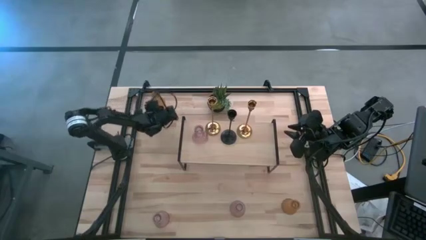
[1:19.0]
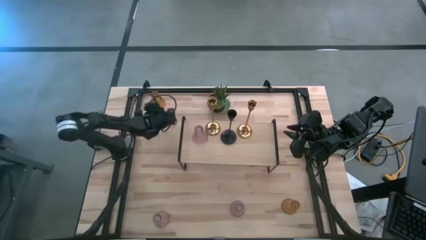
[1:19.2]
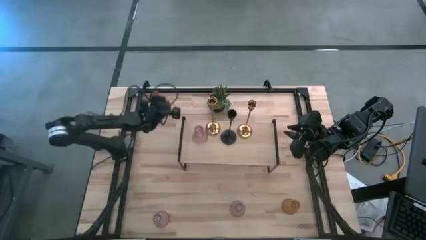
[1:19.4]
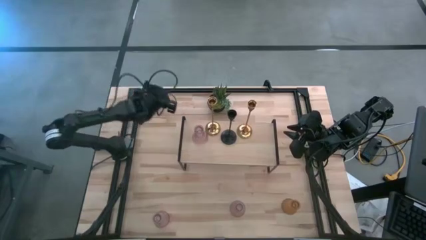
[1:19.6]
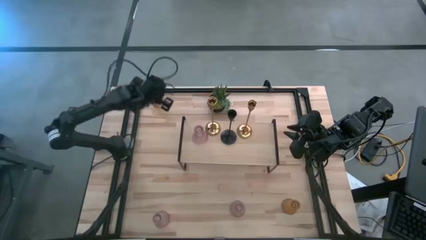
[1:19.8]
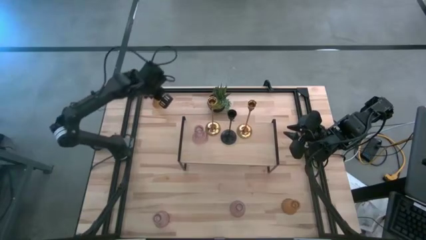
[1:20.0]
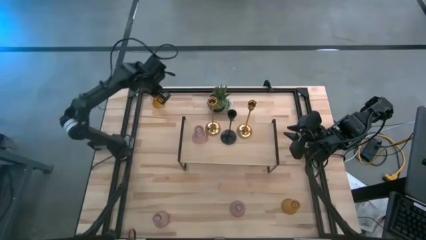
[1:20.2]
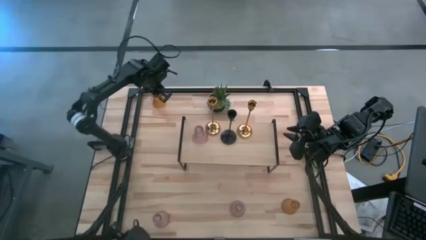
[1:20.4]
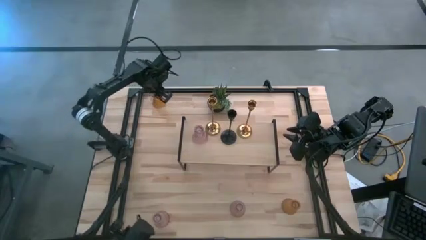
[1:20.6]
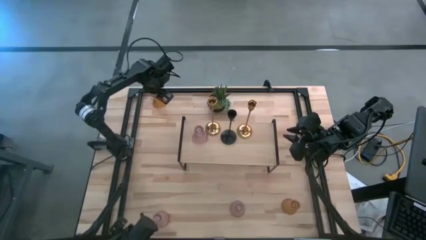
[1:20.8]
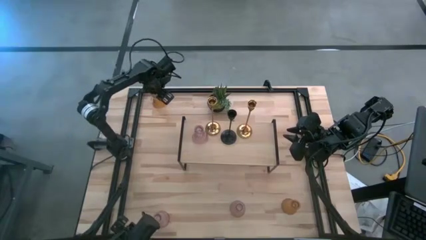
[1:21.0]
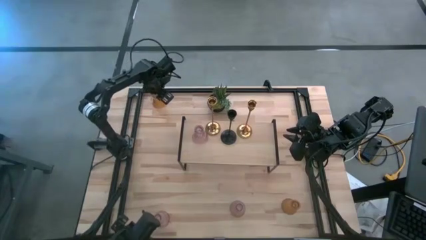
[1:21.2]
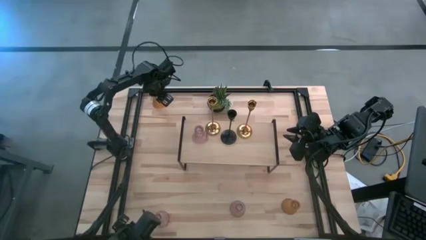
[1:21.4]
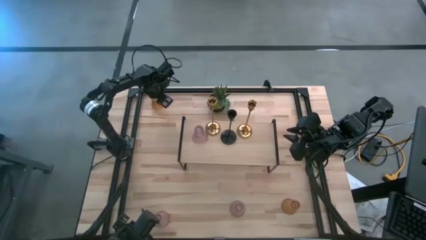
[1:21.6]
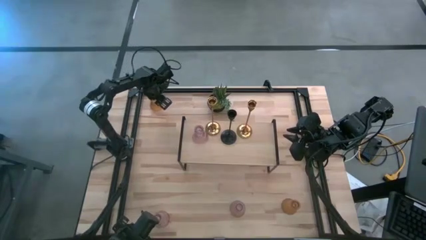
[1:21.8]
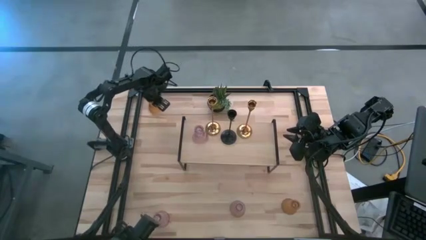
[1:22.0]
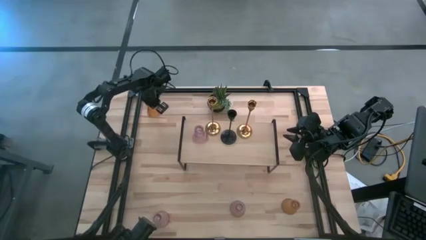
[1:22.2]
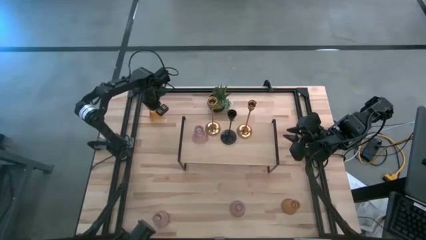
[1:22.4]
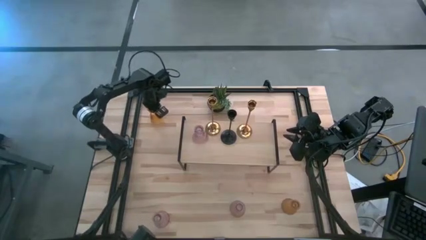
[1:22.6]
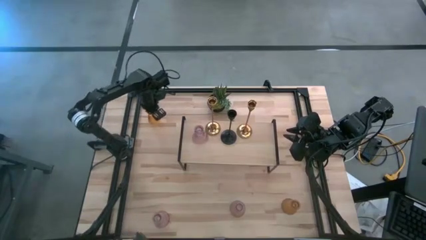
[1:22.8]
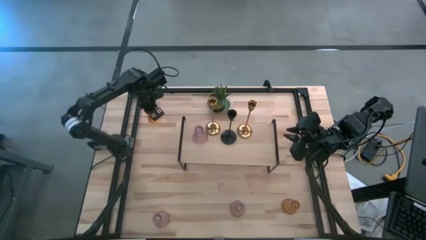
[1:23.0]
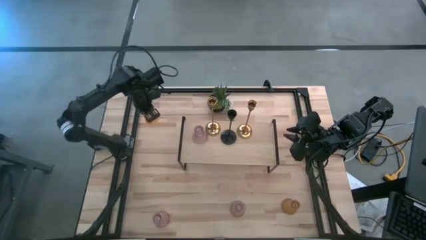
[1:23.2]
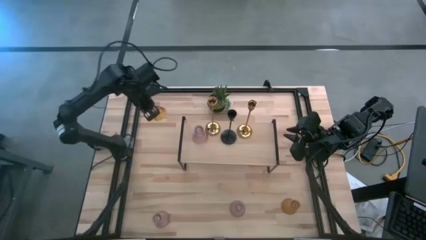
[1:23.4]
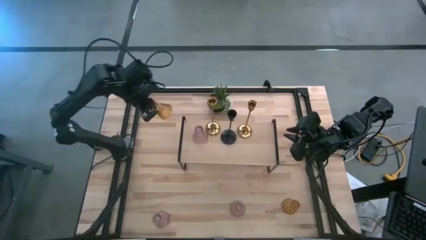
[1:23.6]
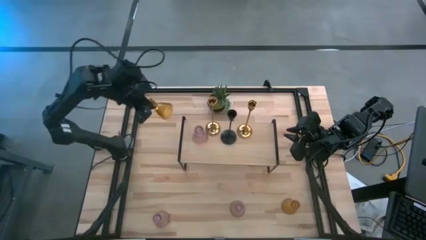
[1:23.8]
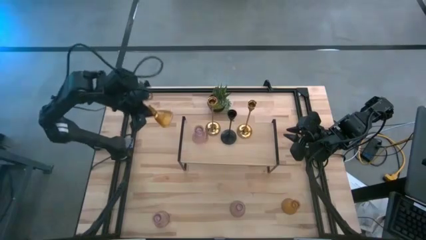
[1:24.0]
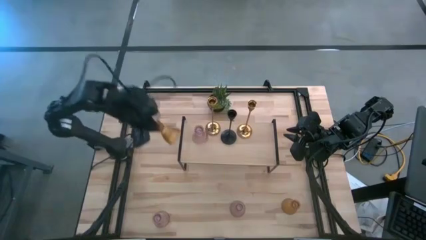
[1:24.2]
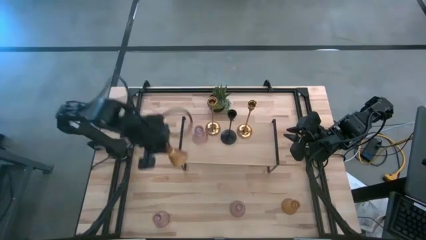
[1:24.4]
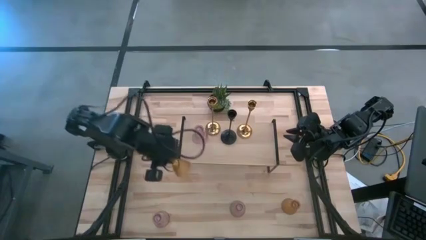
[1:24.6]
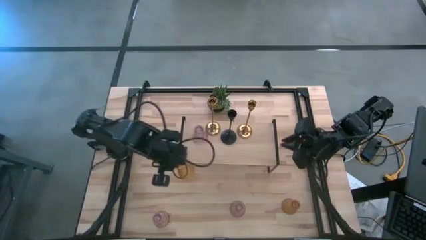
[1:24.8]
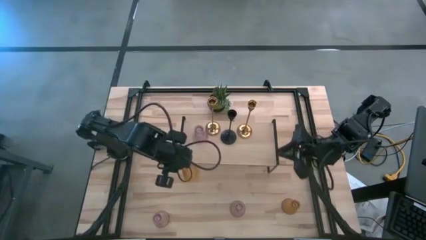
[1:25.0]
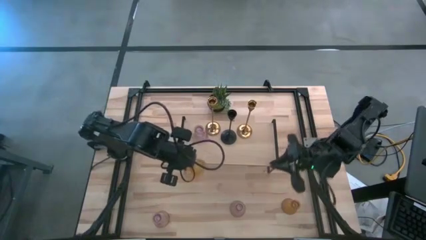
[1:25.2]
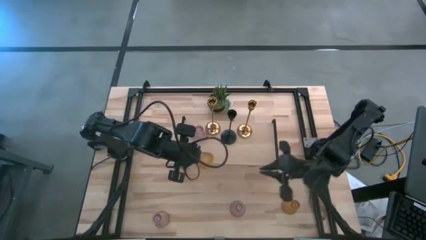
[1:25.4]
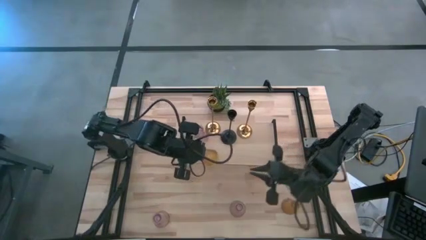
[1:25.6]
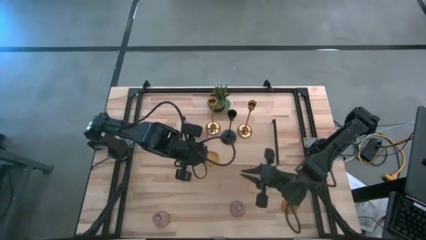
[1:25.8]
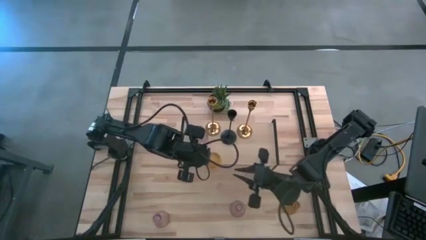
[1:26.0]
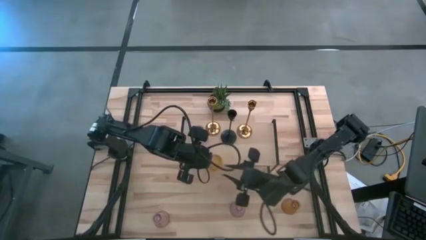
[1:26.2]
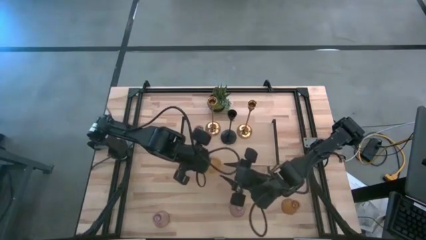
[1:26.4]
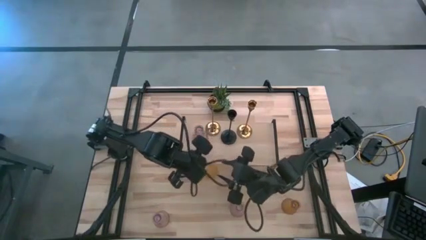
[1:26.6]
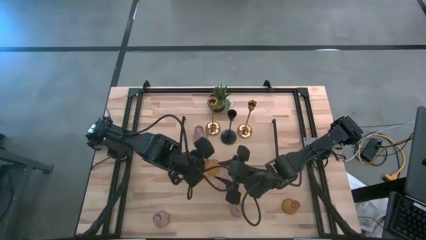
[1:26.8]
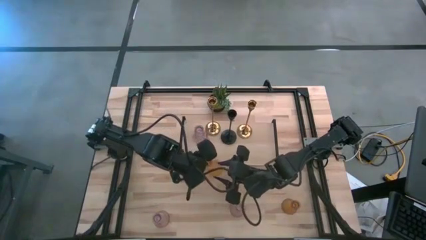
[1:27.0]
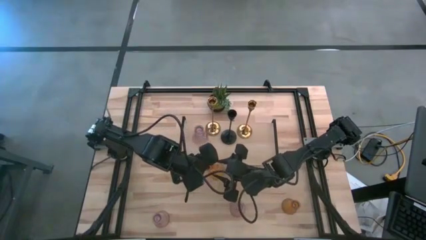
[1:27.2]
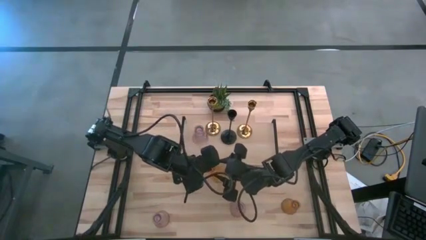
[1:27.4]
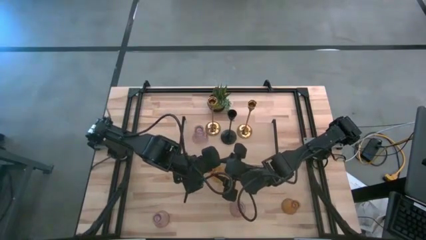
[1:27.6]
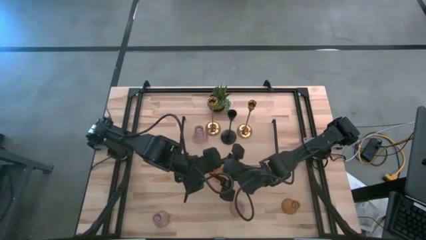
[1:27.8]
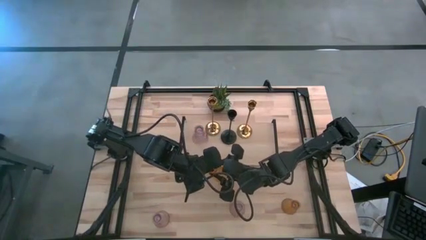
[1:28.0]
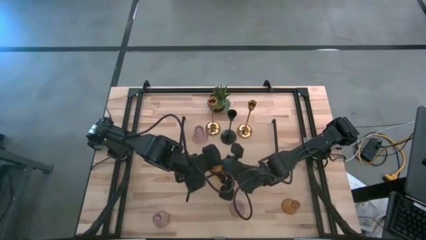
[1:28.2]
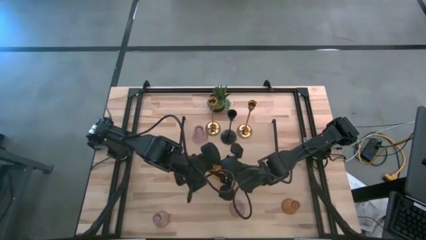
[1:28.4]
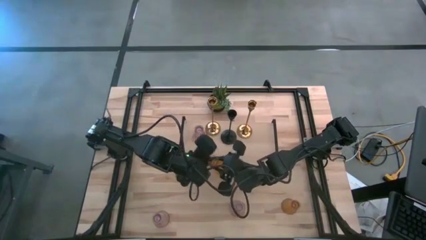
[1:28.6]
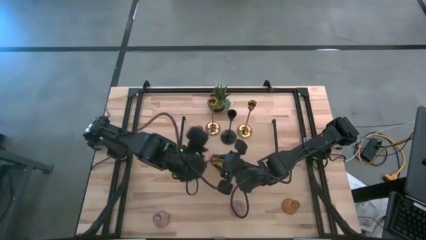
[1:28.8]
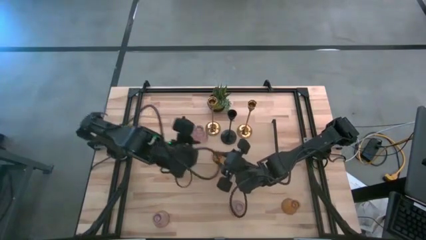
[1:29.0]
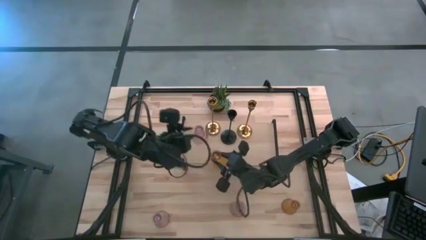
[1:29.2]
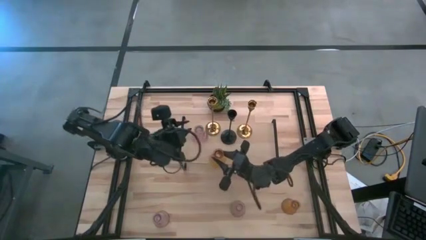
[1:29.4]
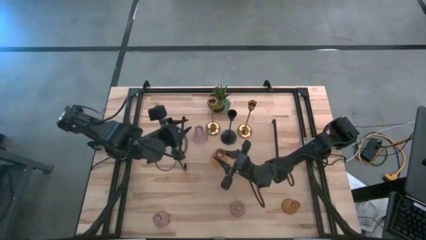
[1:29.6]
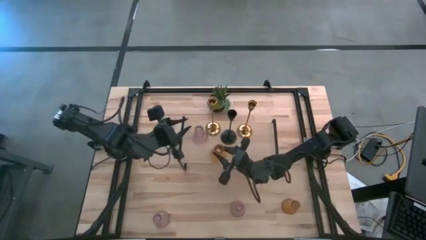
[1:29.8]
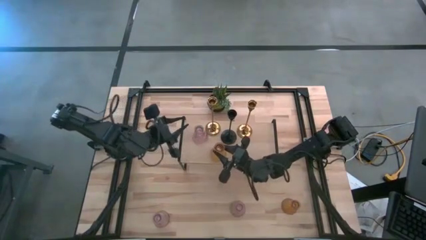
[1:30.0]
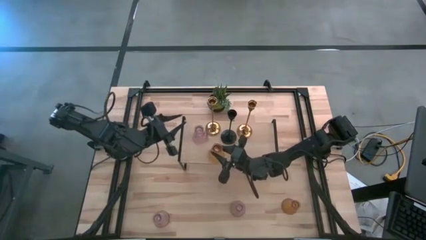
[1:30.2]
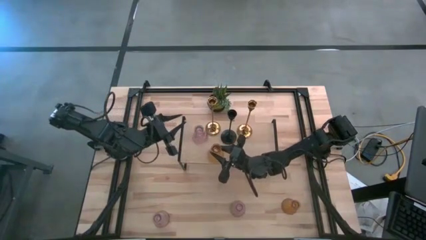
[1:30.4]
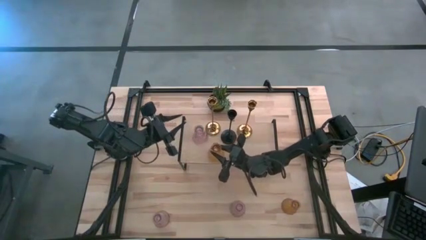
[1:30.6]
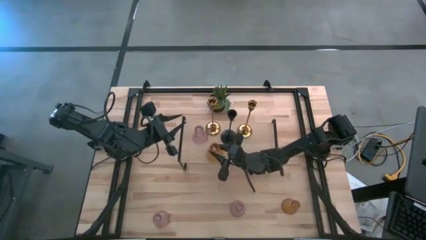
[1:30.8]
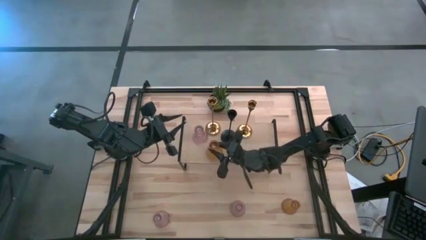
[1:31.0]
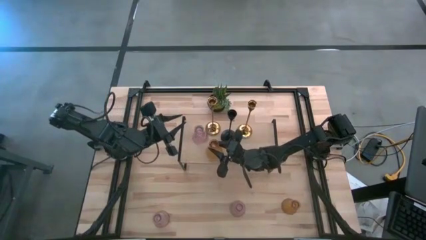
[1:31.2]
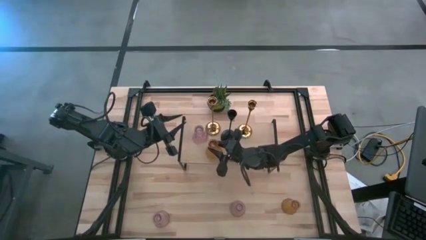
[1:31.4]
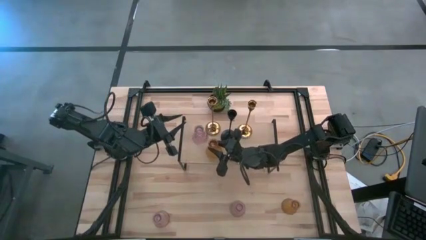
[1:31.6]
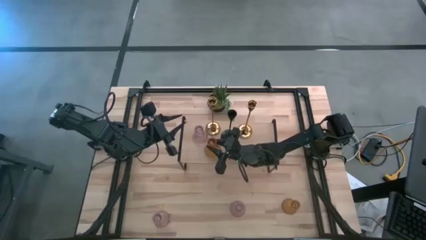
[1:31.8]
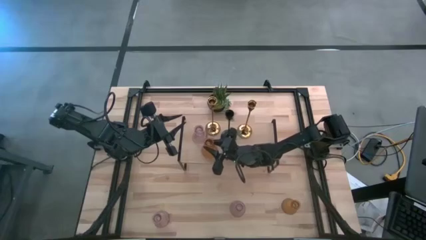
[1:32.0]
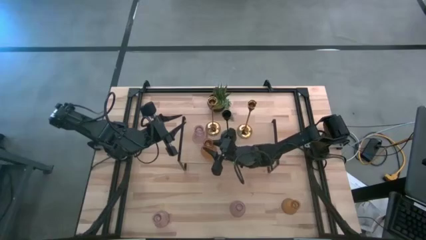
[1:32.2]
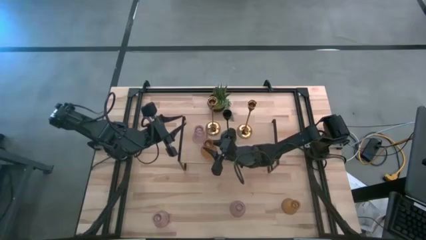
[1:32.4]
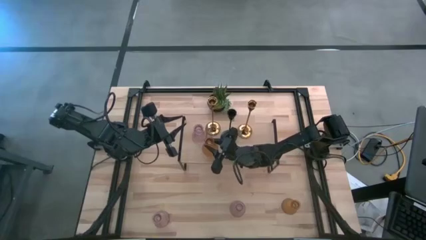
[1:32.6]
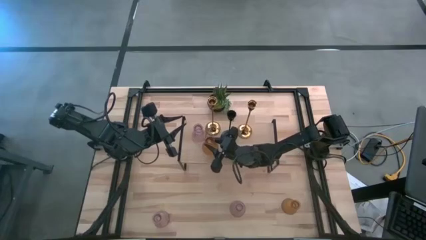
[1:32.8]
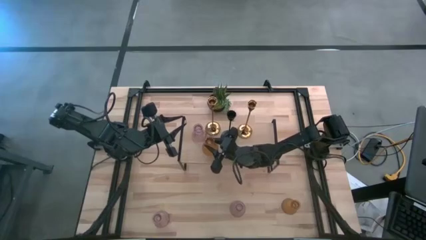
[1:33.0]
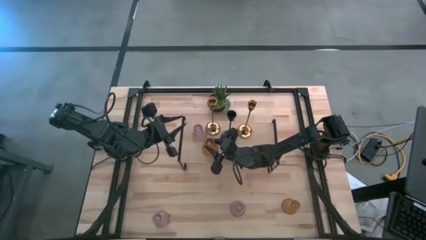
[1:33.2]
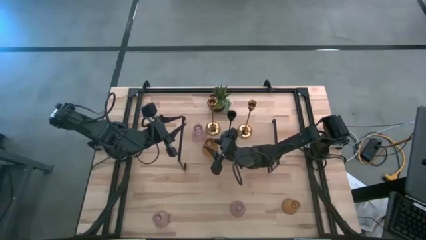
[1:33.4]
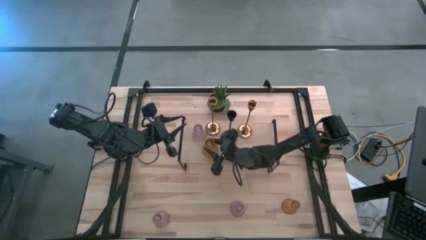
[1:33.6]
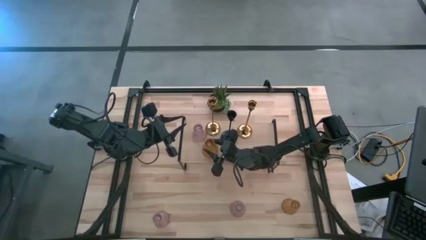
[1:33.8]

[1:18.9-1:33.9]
Task: Pick & Place candle stick holders
Put the top orange glass candle holder on the shelf

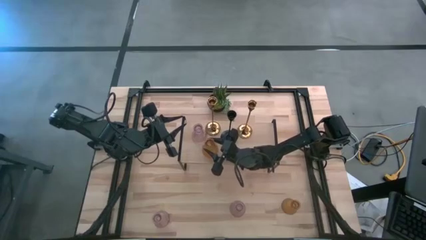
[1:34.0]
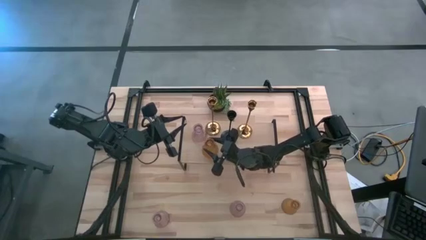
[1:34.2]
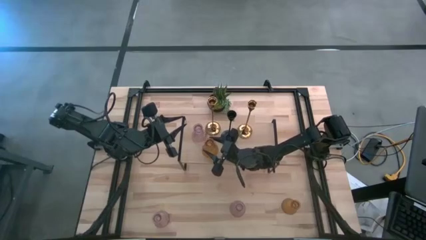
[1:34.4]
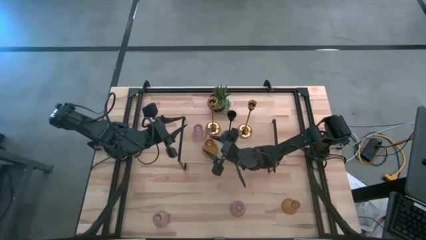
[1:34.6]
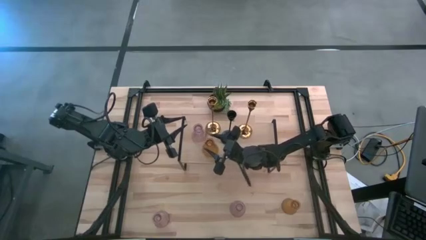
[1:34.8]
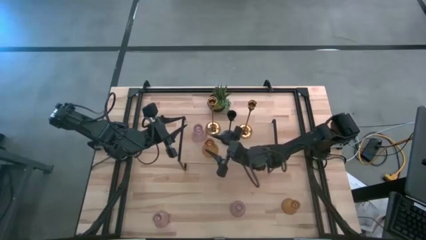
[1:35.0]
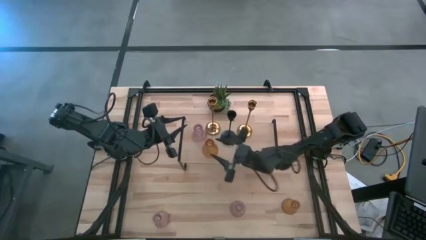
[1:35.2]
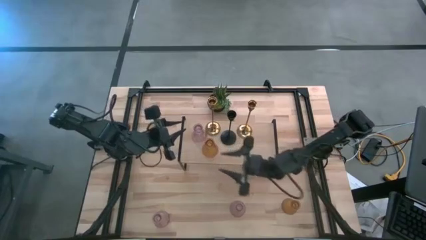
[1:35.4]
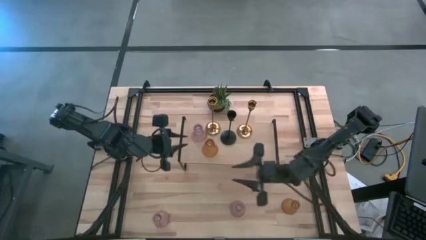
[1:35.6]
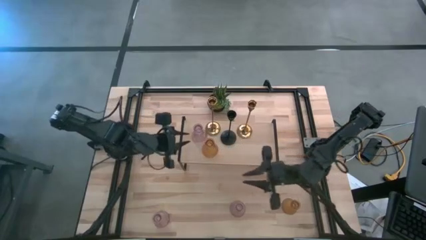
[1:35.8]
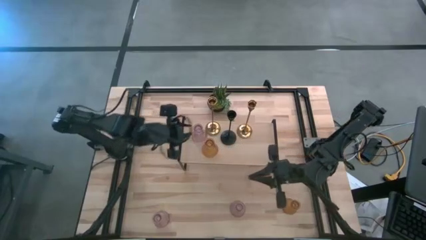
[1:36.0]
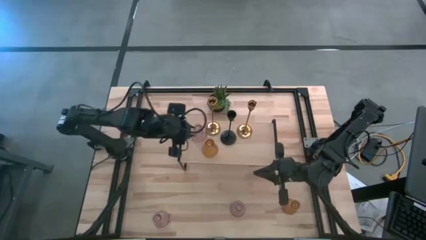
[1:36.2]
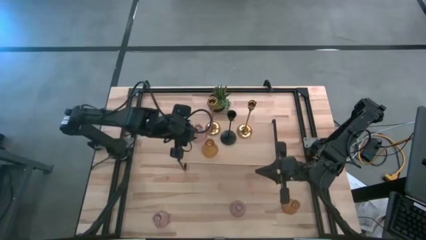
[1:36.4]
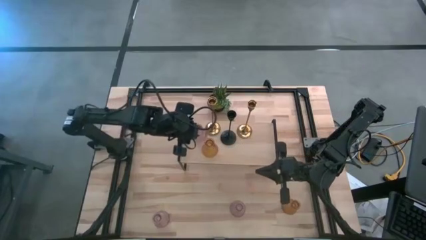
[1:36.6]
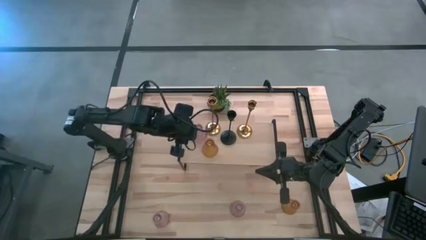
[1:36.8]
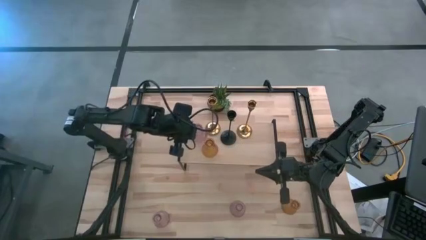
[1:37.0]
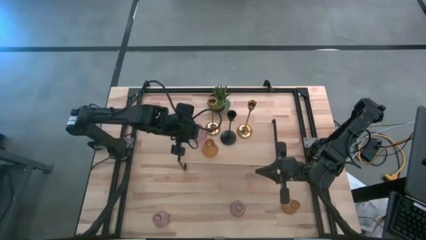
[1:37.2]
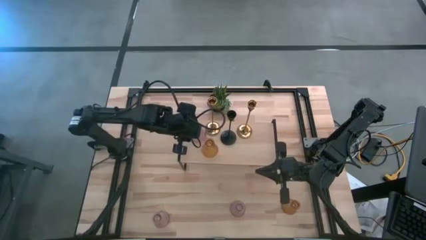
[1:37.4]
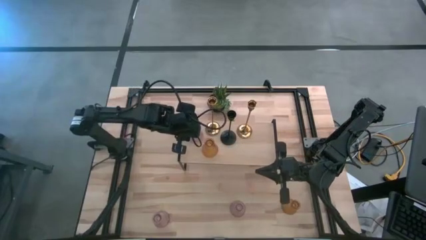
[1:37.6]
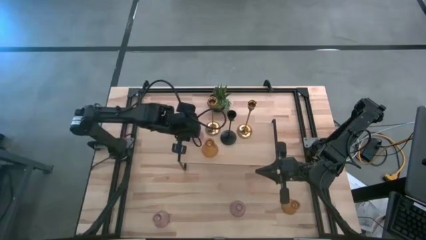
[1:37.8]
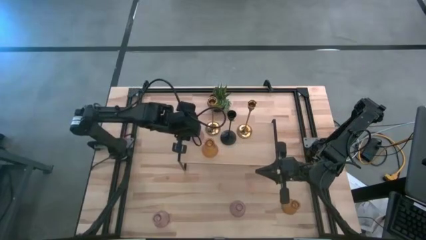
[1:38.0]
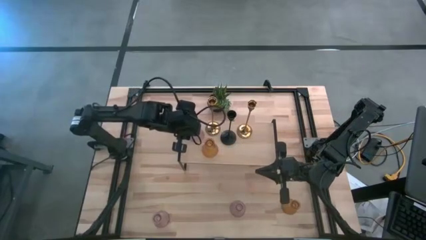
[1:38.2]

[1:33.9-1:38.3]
Adjust the pink glass candle holder on the shelf
